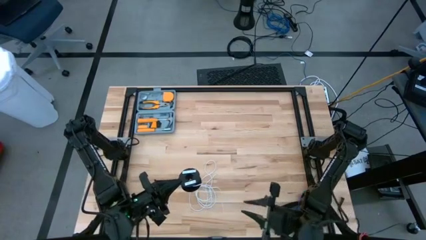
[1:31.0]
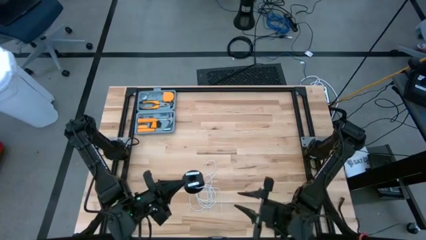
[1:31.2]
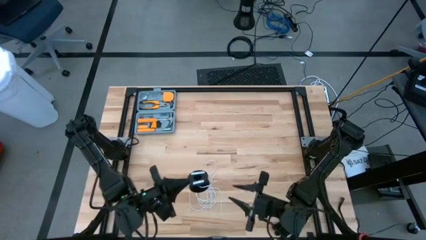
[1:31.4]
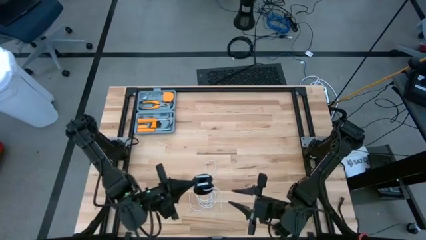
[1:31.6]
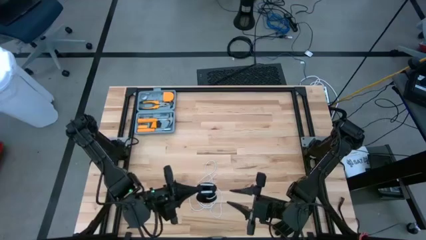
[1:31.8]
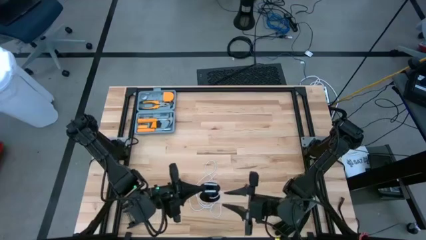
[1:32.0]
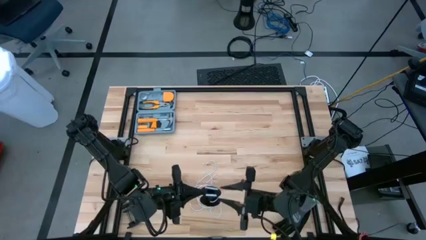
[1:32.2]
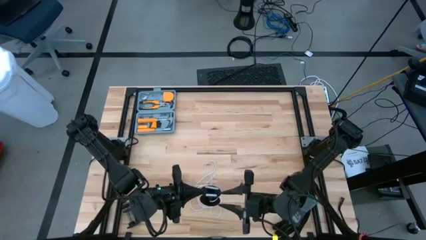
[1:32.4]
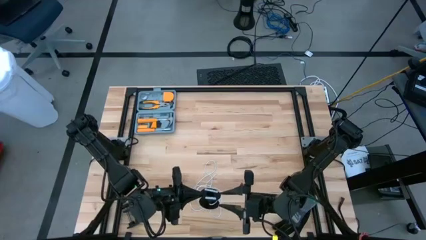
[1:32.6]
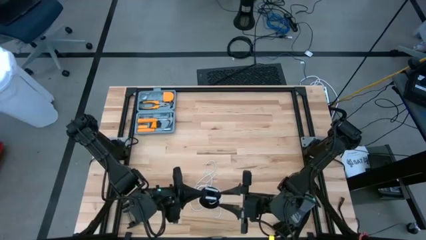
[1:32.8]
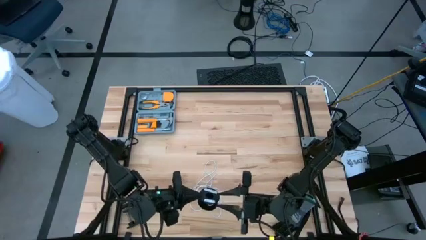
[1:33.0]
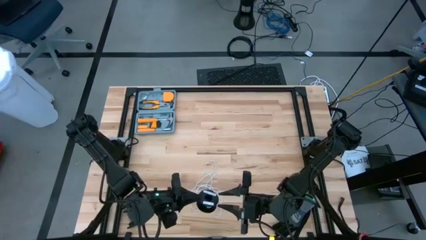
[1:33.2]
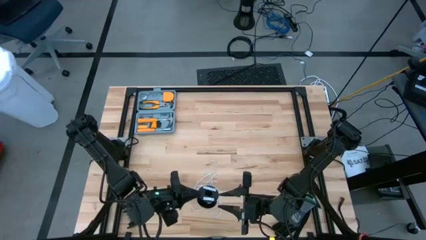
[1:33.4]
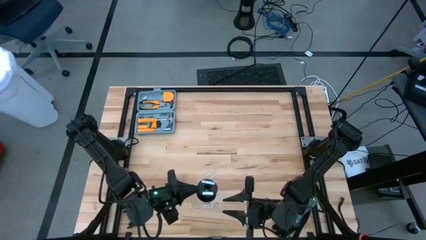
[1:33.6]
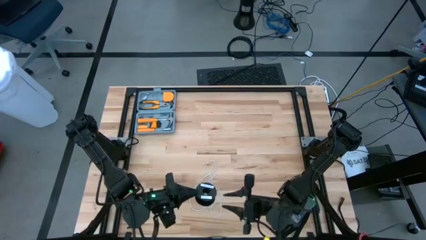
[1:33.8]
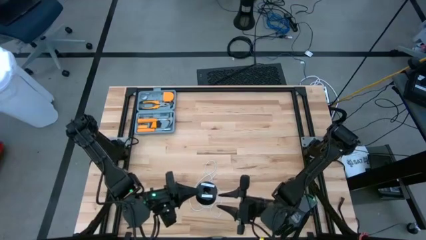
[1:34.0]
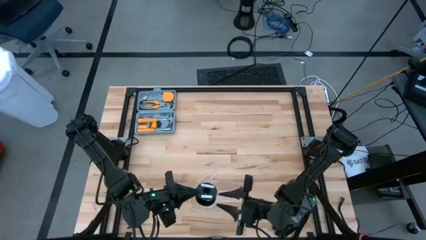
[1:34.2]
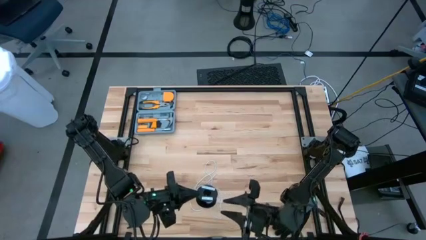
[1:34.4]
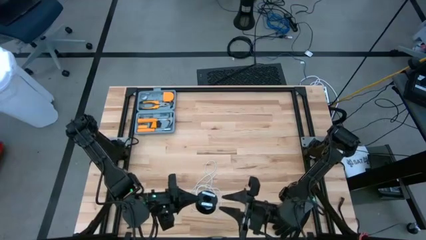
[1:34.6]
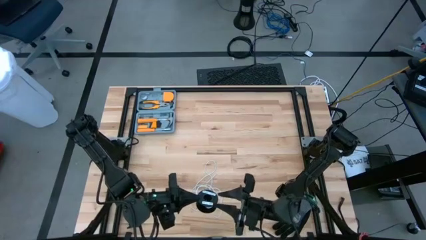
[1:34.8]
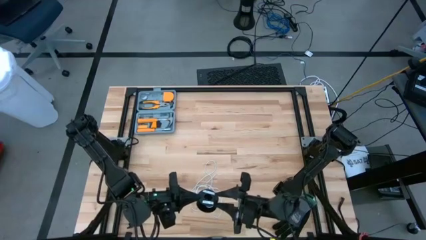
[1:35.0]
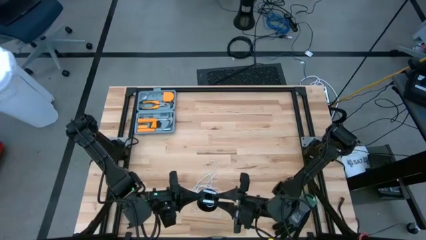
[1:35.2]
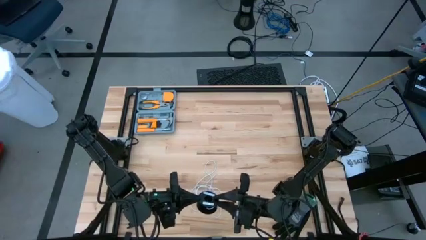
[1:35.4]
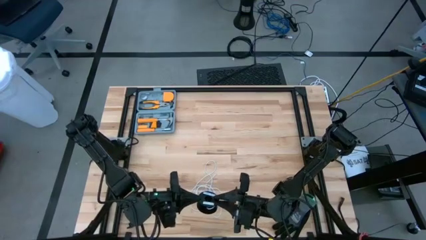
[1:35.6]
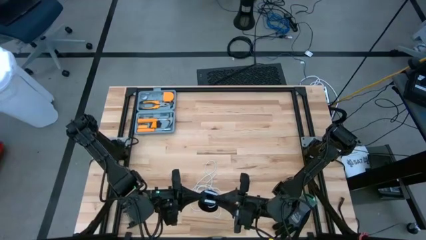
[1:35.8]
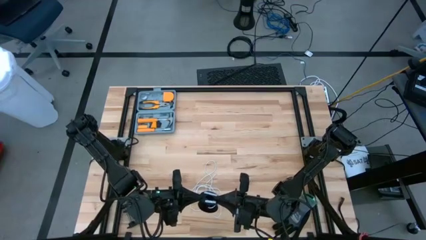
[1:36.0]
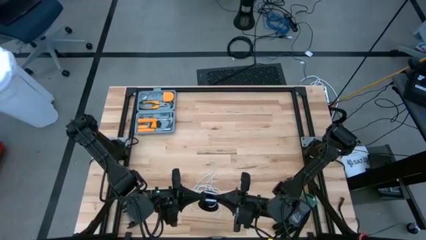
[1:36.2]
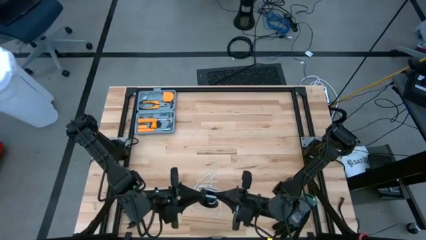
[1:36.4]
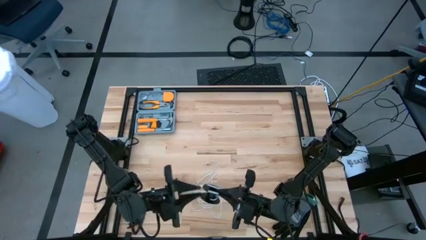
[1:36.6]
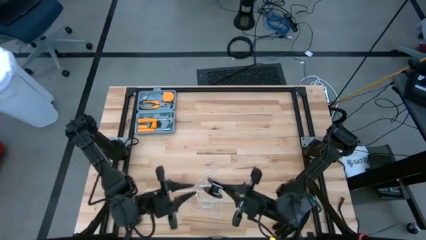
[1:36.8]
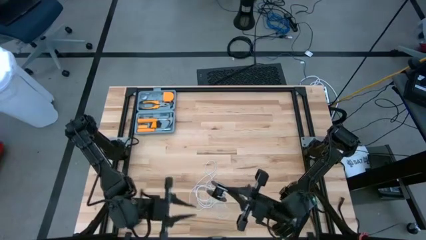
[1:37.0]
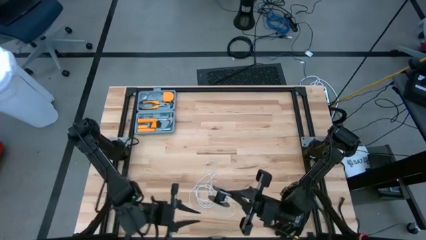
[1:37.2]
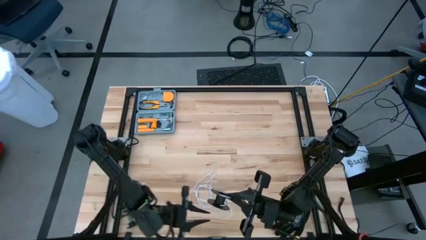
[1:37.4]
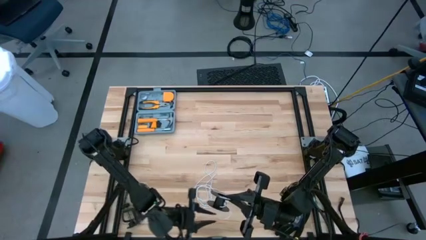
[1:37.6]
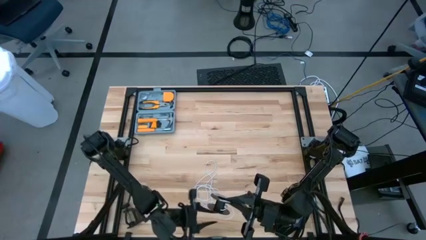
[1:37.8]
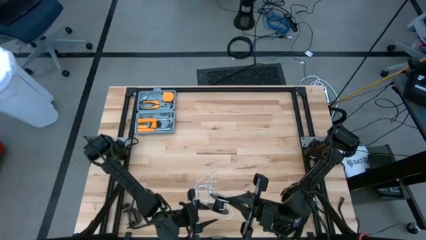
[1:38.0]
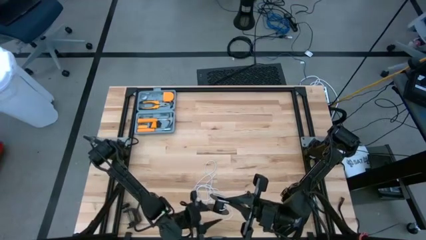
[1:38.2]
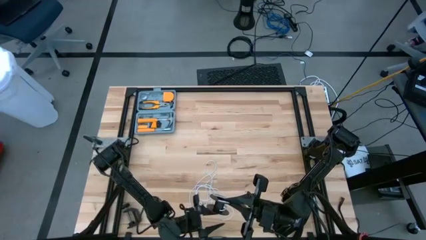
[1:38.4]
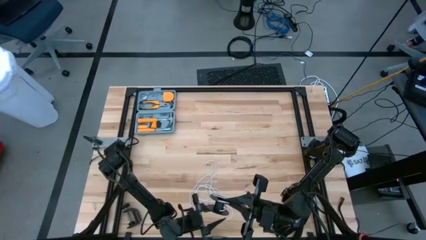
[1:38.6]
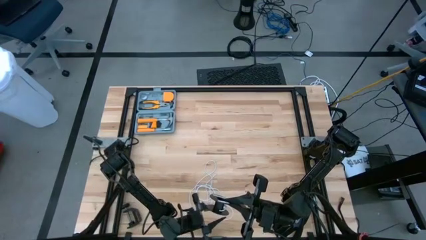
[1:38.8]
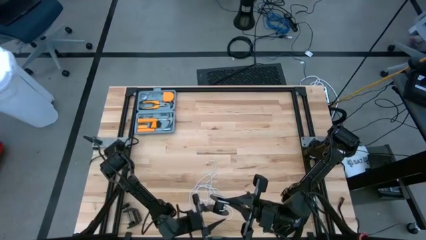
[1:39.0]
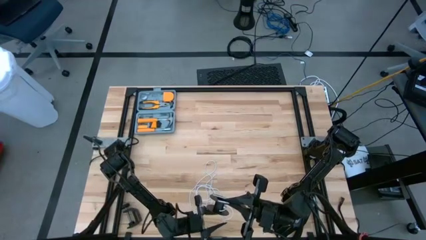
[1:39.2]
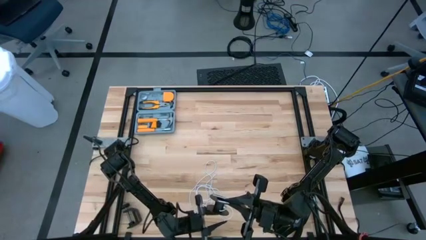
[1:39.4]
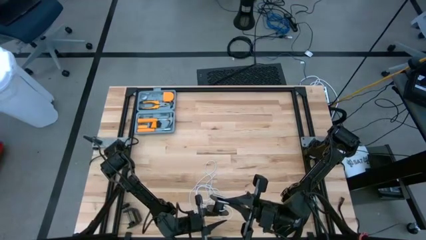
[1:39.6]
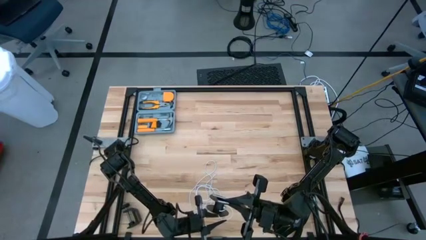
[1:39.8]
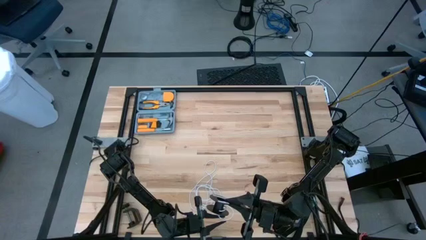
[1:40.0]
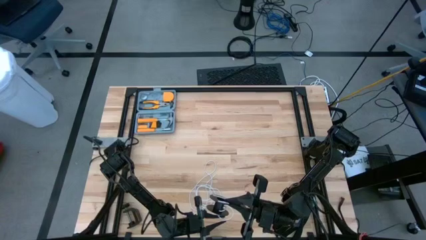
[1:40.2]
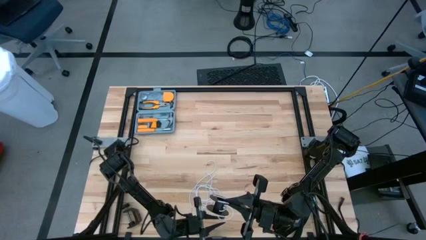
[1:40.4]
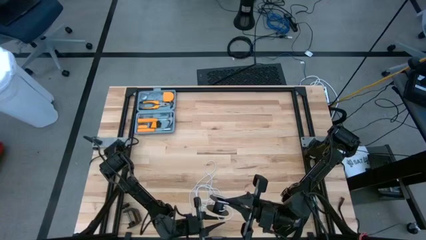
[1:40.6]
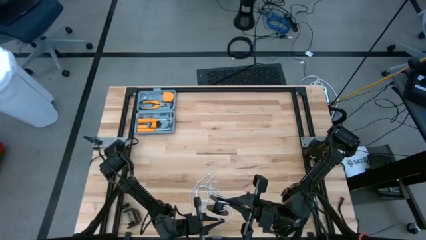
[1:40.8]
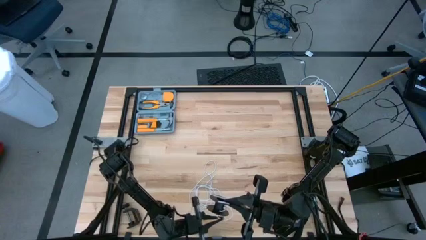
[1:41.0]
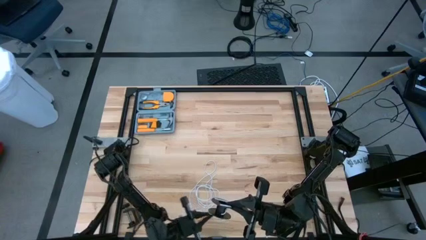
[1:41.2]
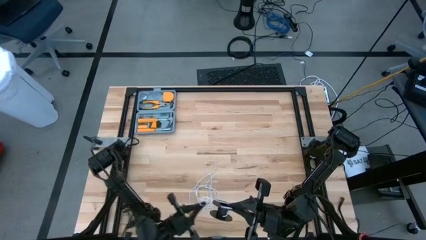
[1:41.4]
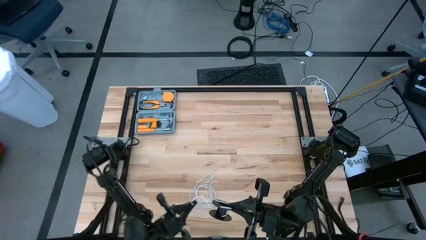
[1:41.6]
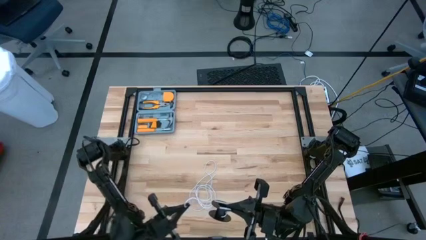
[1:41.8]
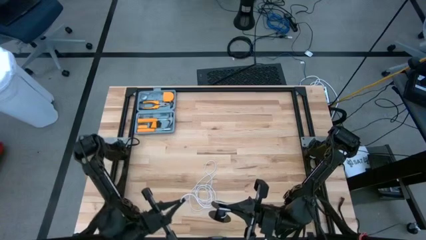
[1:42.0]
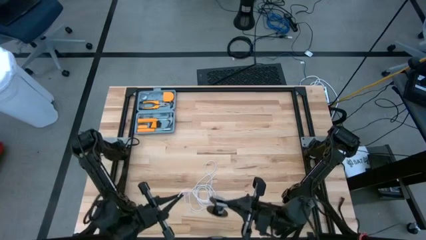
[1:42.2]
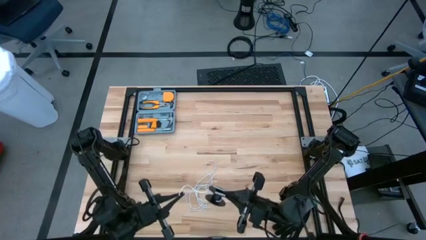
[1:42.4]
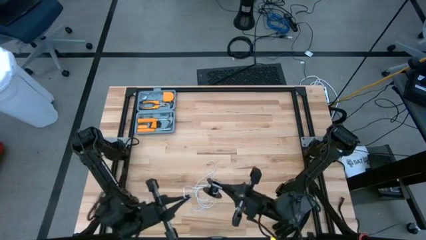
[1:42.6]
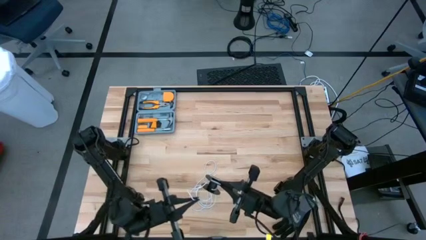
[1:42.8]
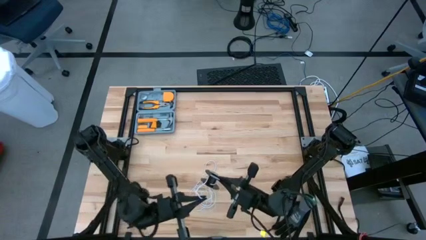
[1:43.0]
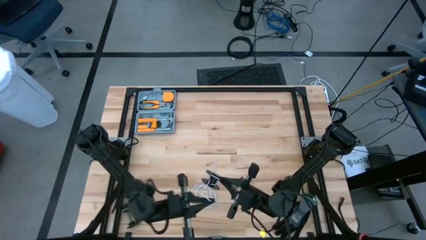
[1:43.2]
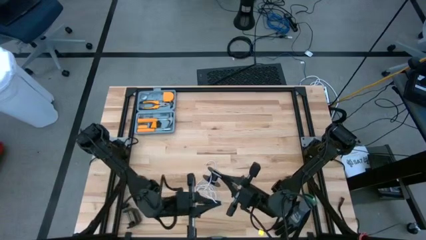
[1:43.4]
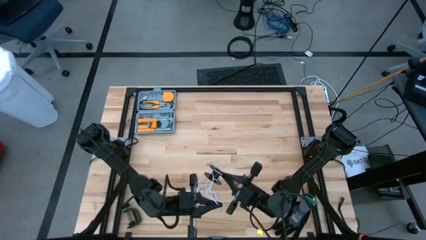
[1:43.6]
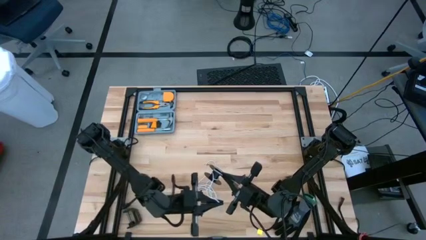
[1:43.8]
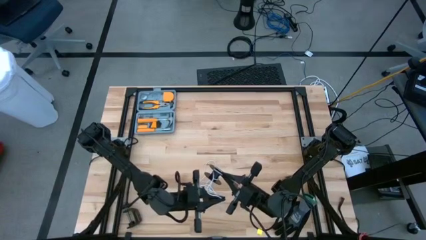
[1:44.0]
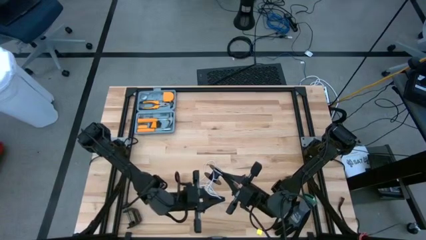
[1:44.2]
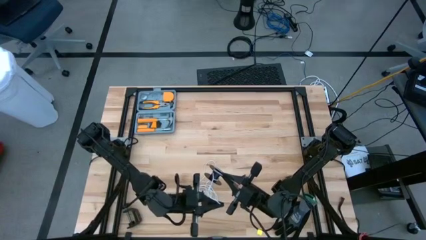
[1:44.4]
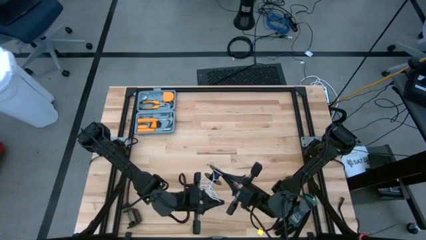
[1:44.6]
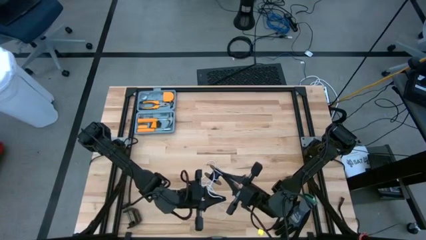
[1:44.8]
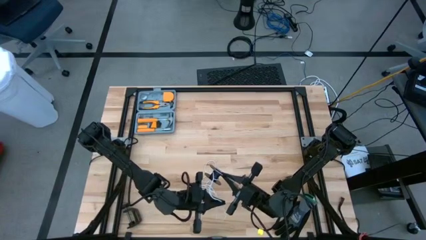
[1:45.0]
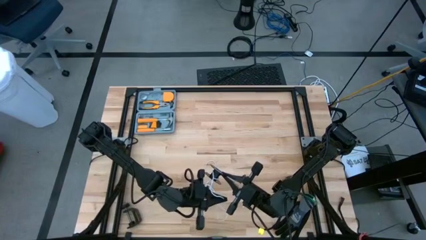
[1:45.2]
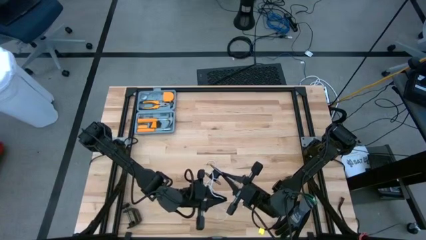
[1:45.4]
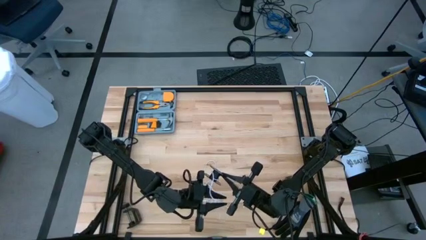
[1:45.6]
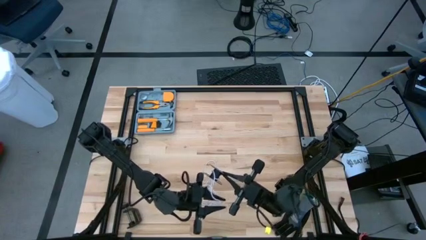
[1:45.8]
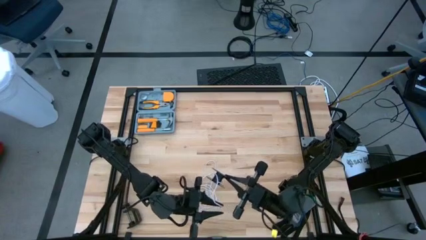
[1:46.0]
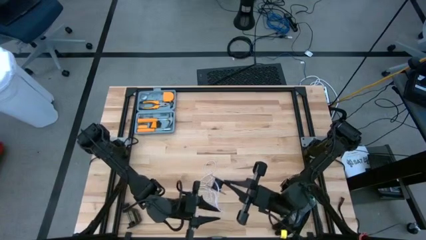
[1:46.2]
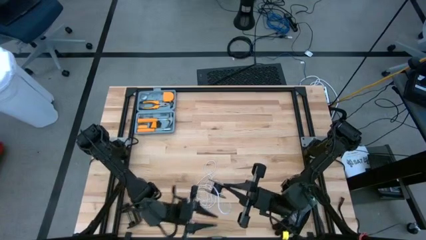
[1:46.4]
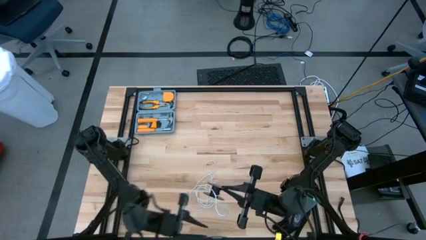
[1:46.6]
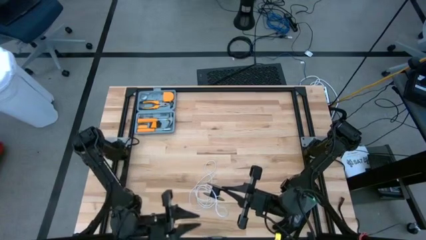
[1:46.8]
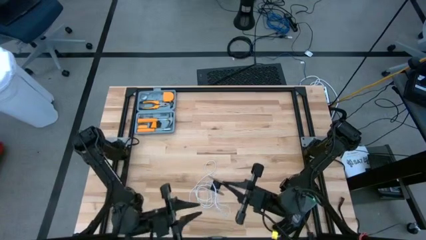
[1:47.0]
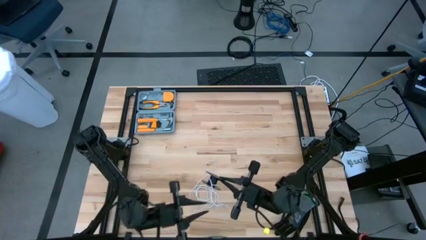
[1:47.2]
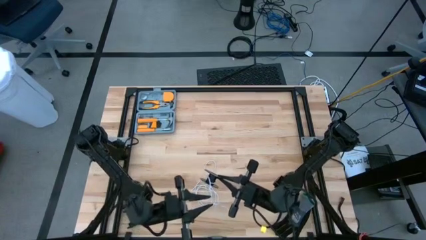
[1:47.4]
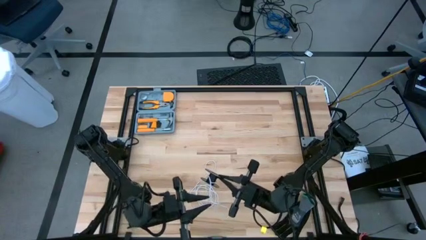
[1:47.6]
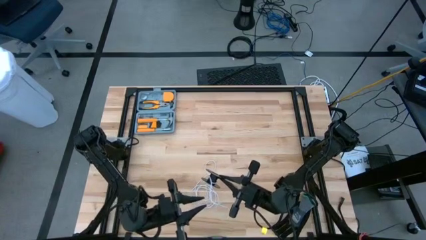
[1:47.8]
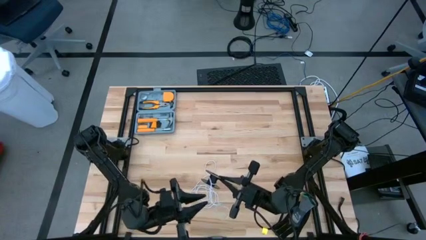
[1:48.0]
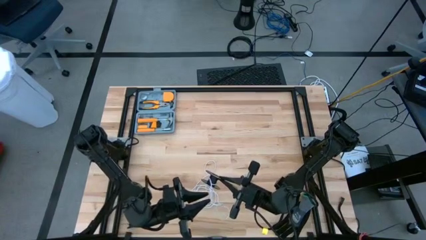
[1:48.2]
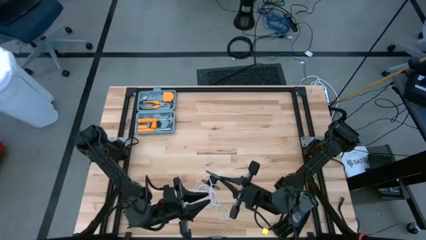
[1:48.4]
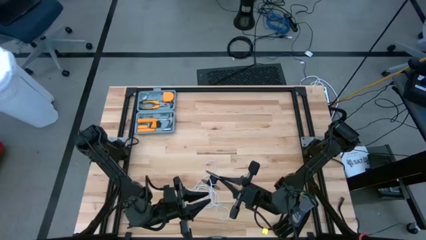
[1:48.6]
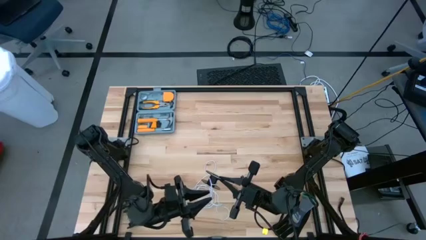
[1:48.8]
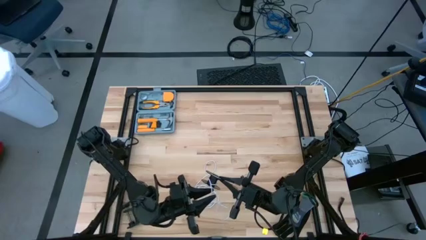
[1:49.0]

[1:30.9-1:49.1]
Task: Coil cords
Coil the white wire on the spool
